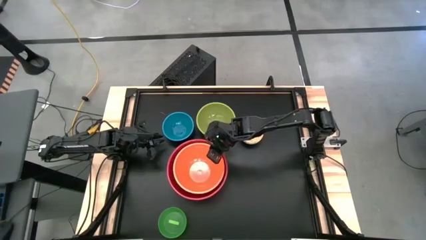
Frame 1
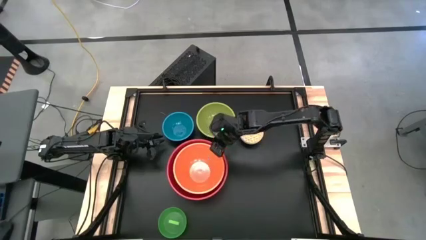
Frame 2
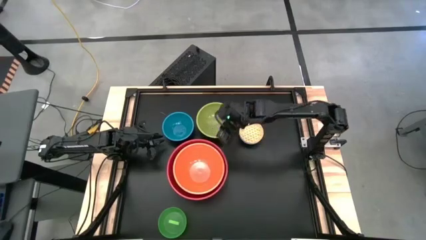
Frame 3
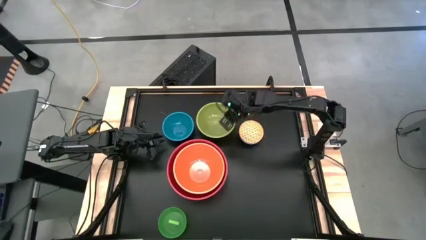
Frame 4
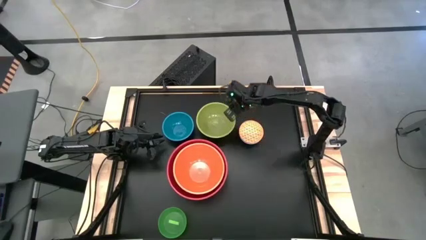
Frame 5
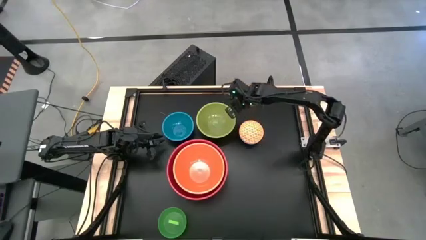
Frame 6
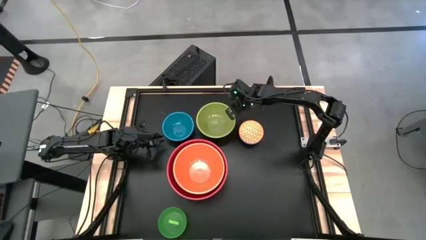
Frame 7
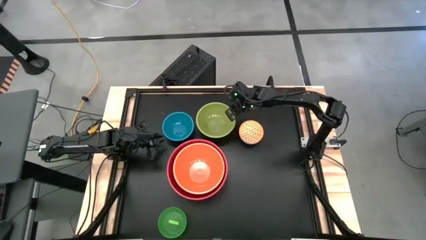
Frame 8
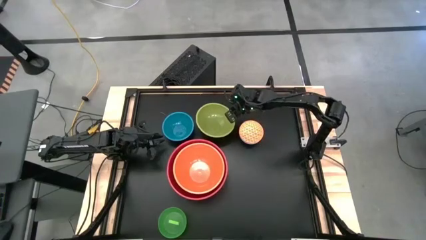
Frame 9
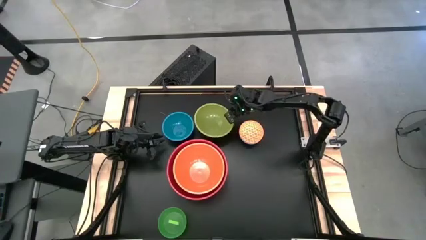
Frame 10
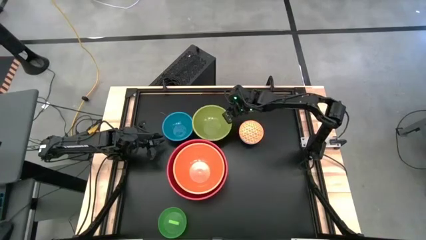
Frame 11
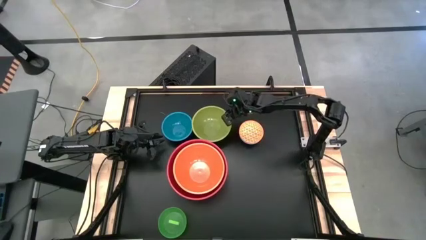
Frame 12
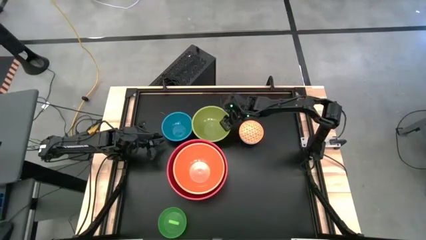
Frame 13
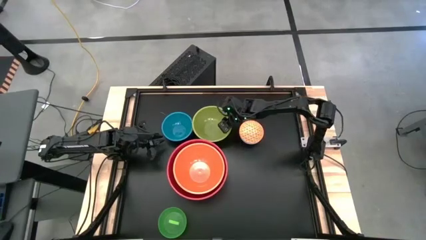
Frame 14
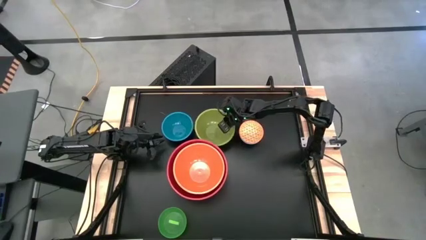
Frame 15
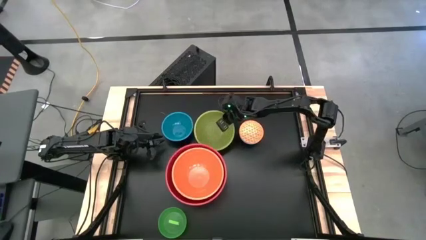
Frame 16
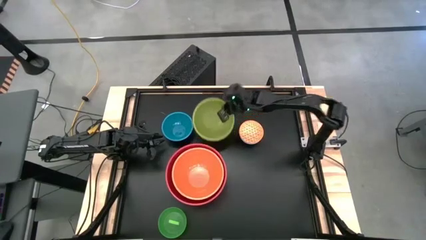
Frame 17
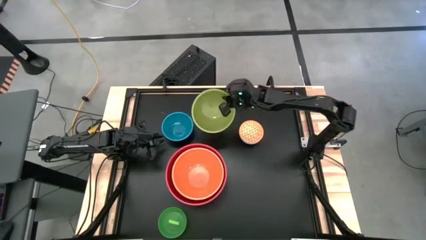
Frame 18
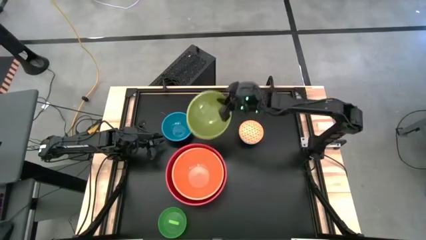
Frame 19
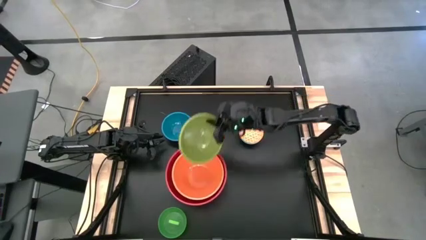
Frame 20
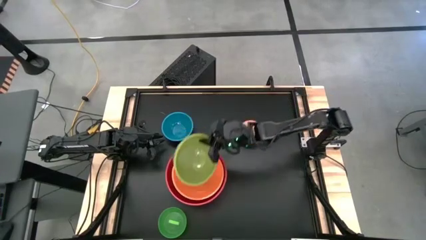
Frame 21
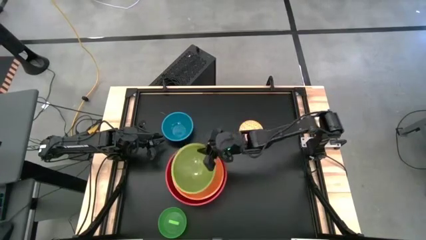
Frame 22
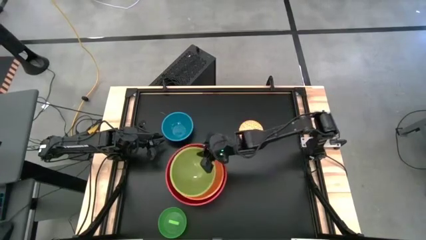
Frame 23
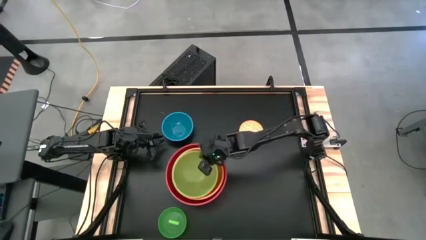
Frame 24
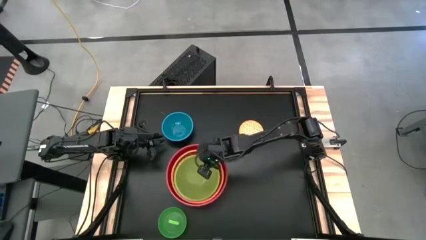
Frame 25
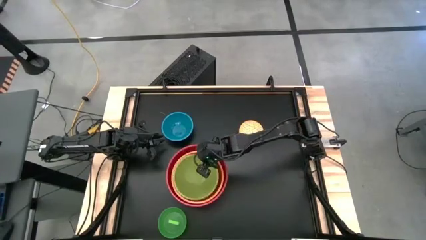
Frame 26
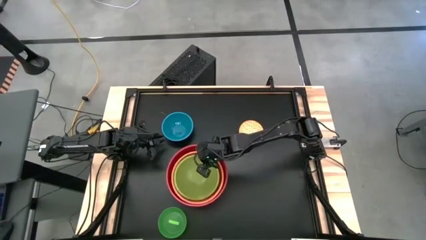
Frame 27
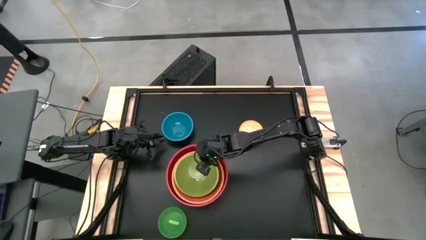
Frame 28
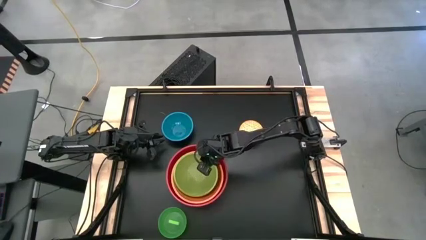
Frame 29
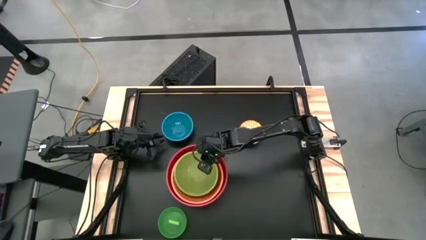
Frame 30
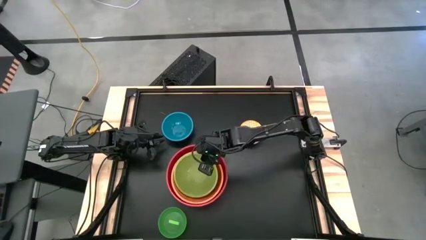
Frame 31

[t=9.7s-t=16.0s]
Stack the light green bowl on top of the orange bowl

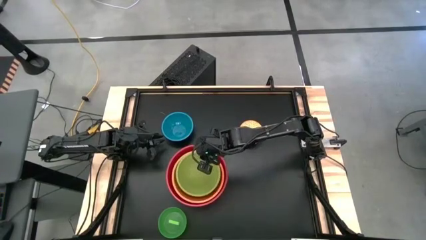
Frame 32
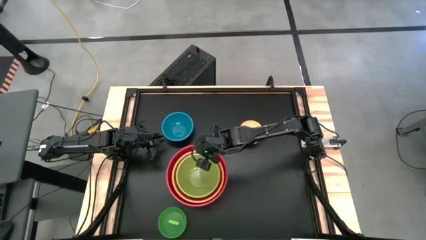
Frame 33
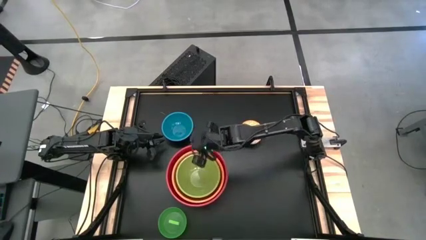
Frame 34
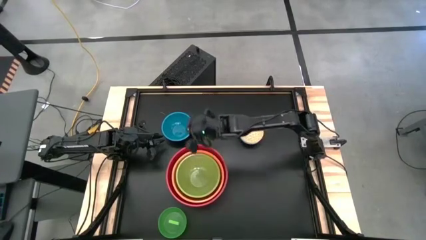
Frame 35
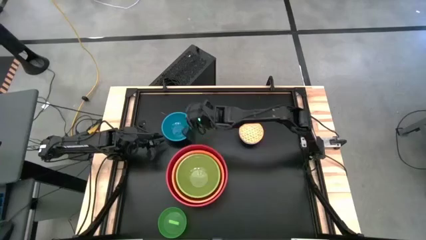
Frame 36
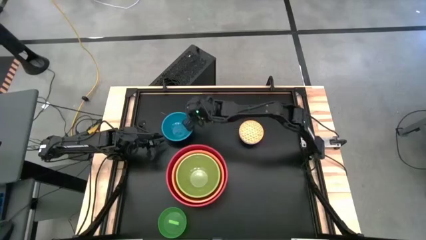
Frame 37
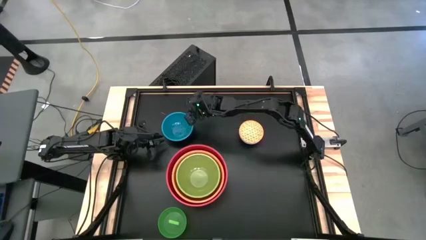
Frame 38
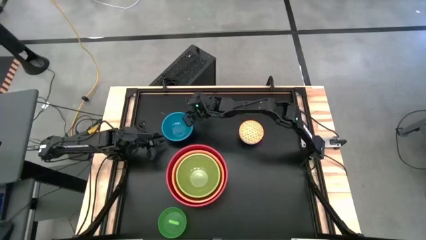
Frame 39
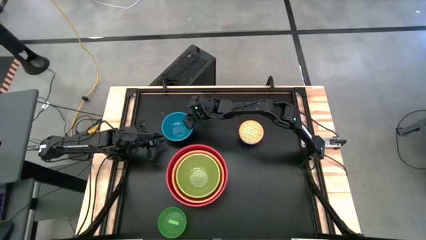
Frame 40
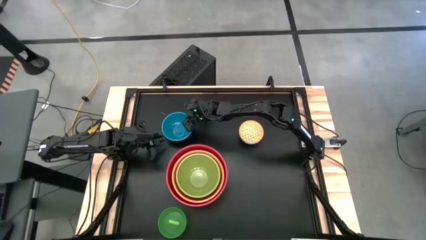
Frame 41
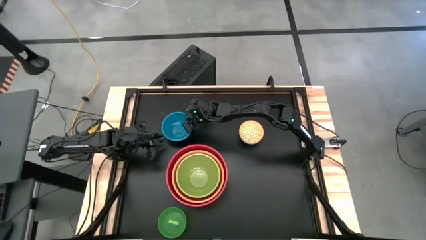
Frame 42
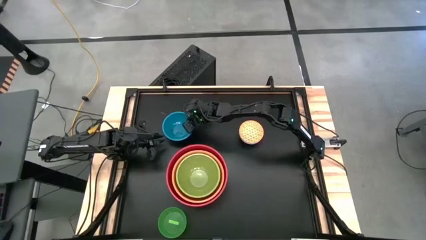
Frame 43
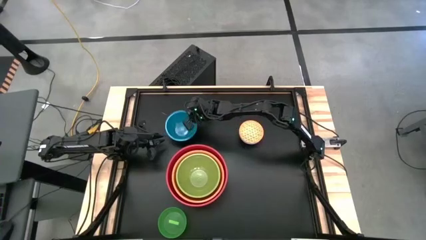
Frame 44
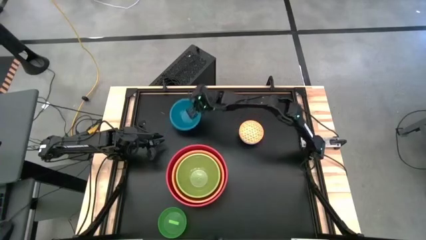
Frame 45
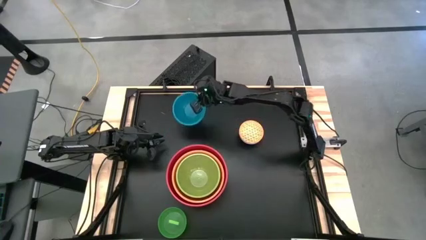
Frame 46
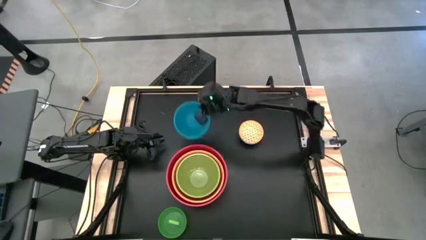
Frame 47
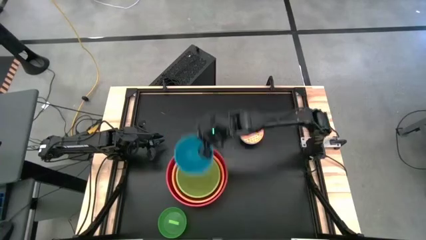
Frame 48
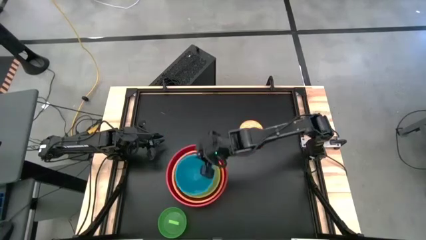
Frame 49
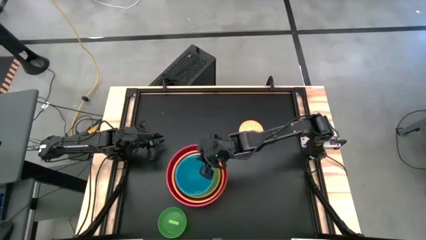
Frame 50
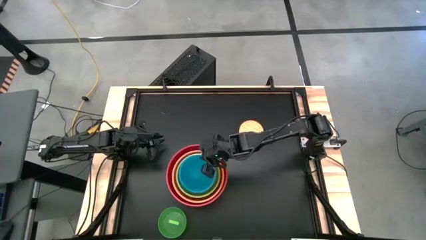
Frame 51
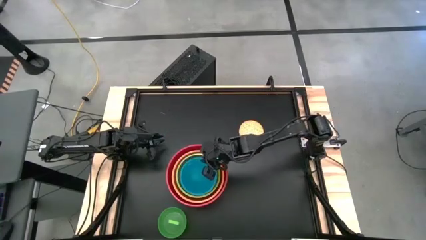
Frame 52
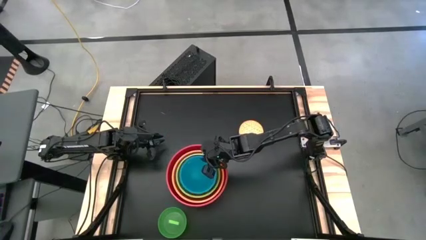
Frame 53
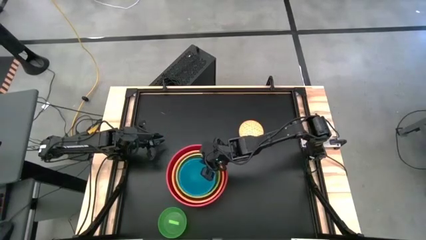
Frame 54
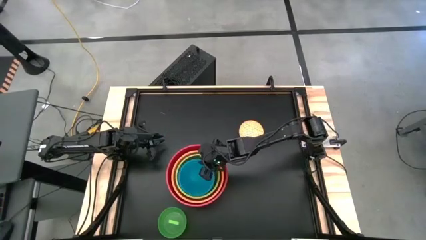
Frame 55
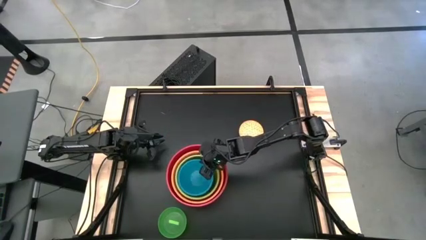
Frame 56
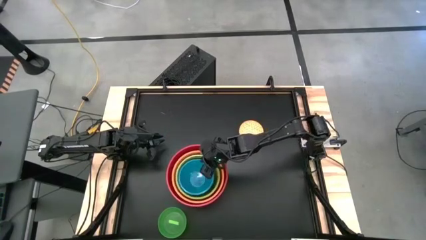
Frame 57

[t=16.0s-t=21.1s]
Stack the blue bowl on top of the light green bowl

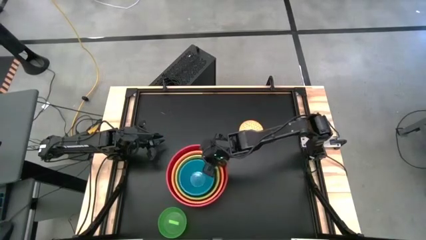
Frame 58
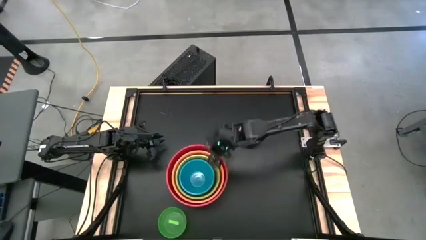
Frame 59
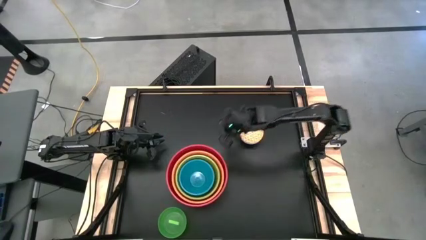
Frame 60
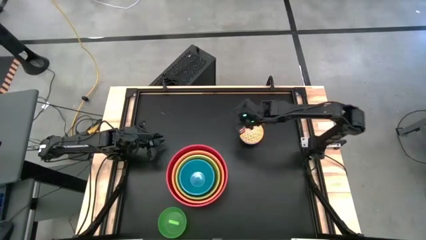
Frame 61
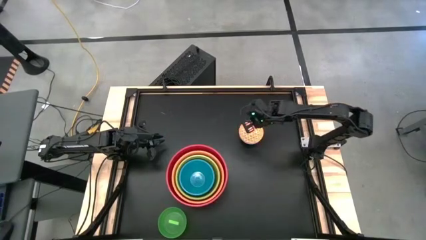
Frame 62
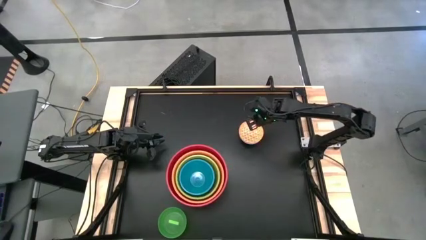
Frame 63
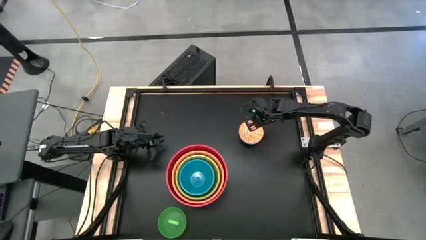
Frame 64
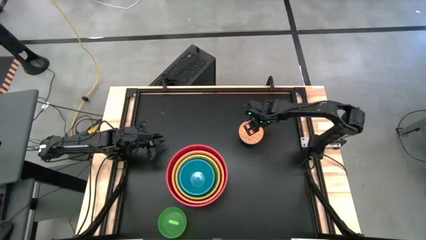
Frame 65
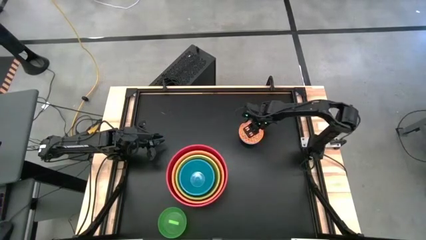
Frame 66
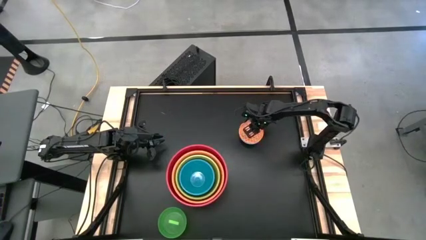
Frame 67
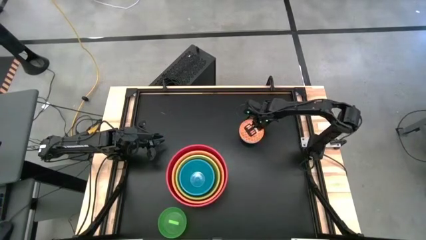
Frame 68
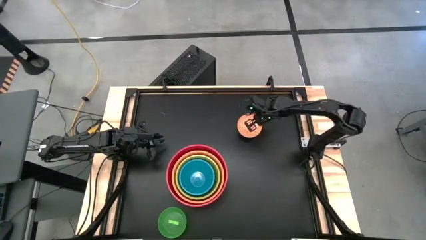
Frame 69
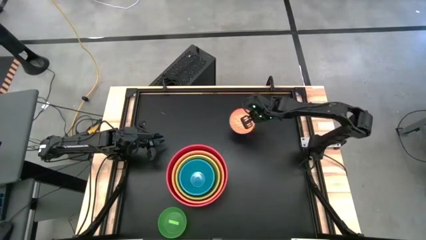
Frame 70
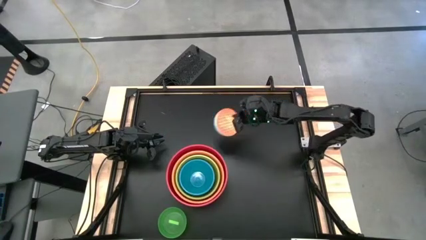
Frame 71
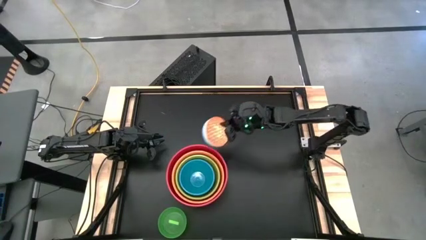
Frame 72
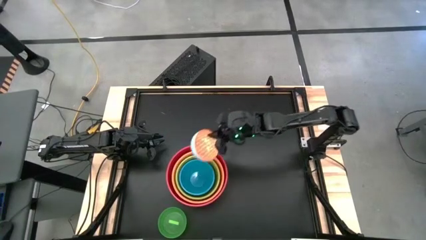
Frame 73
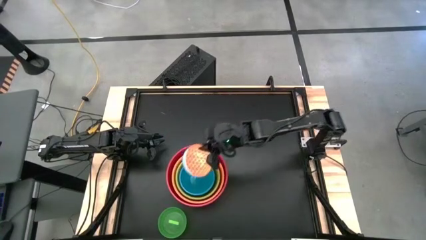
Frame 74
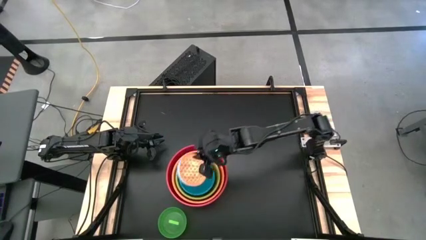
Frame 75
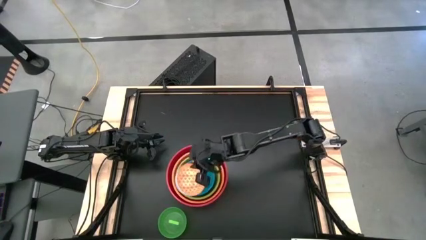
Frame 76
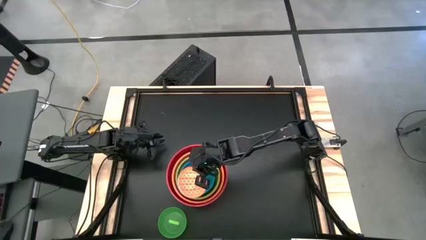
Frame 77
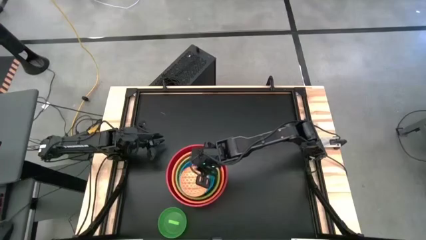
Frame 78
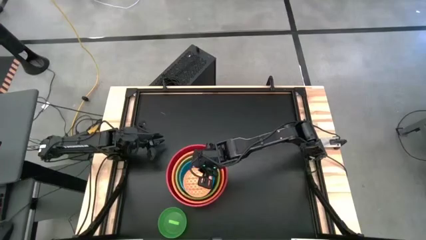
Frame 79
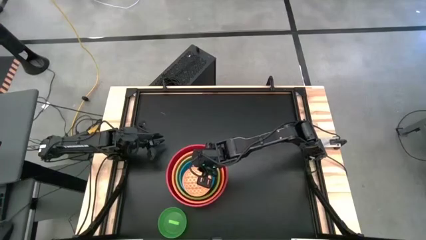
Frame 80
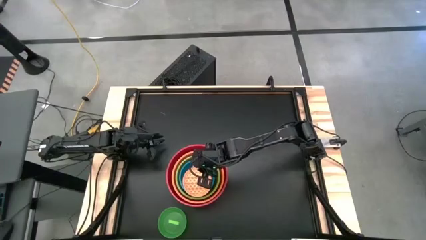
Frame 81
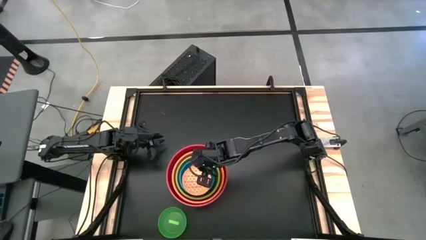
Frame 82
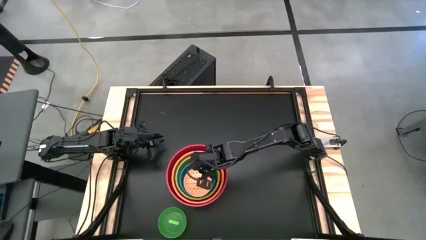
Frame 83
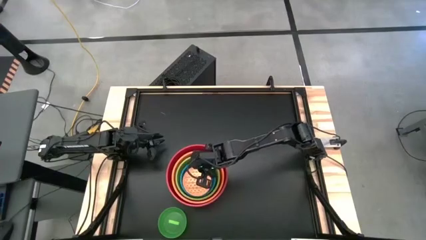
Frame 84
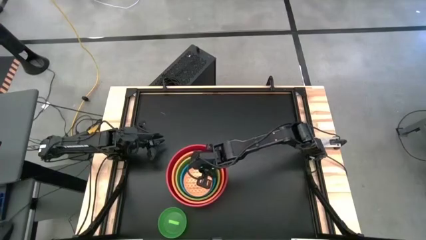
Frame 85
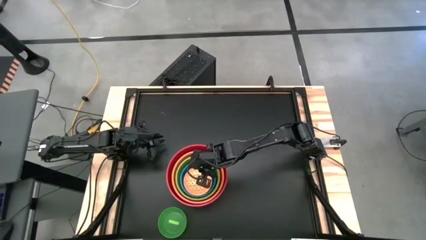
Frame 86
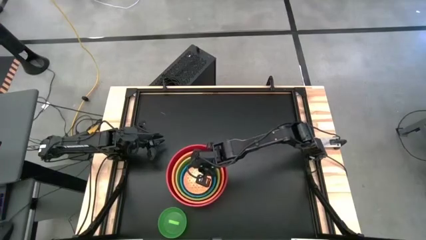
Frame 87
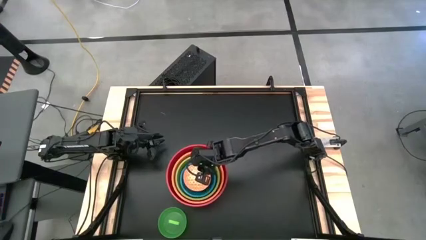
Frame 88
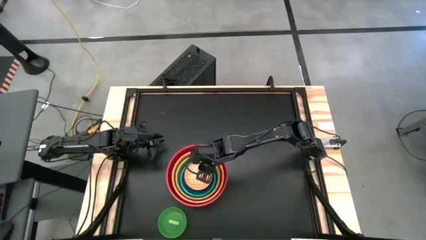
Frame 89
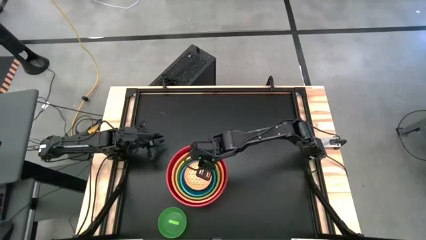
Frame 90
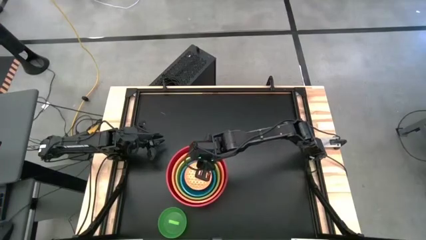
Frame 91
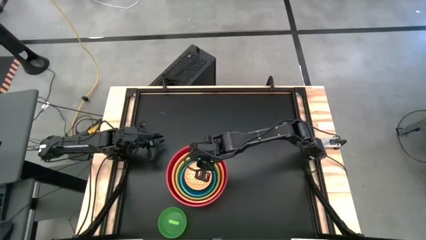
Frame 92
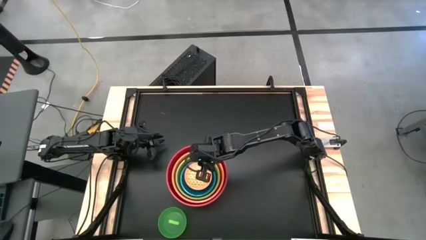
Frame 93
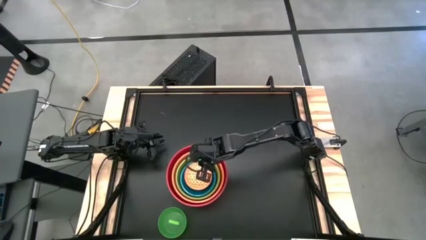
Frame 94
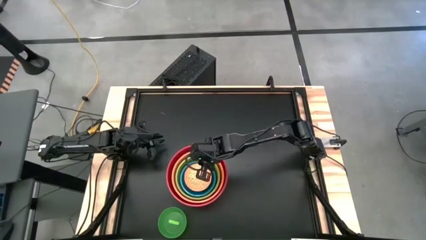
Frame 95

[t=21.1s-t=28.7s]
Stack the orange pattern bowl on top of the blue bowl
